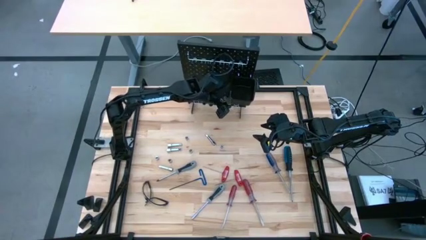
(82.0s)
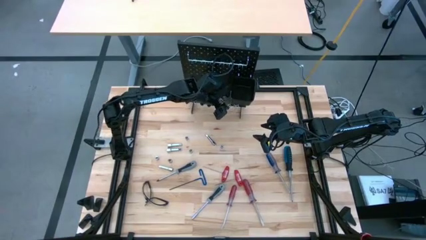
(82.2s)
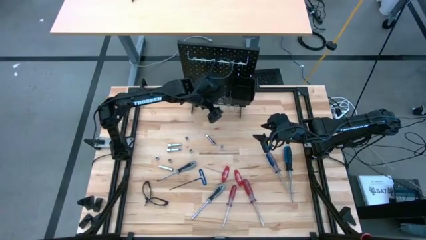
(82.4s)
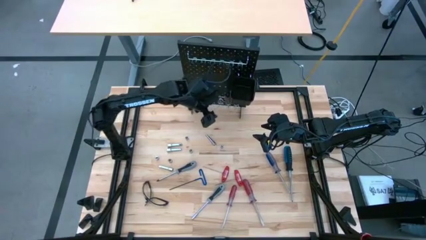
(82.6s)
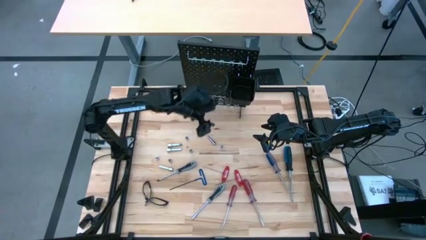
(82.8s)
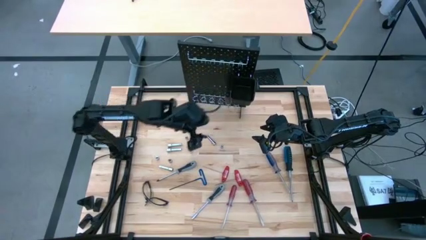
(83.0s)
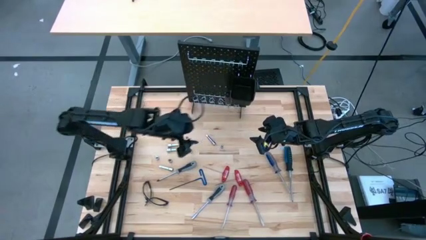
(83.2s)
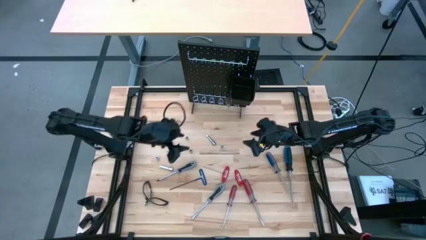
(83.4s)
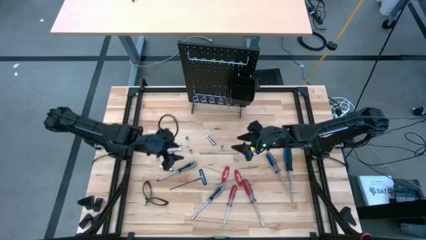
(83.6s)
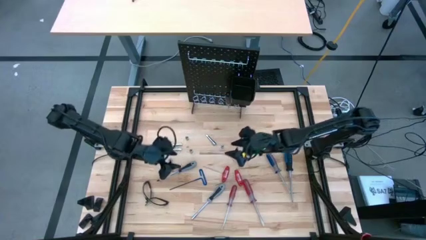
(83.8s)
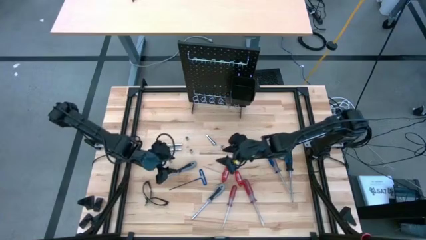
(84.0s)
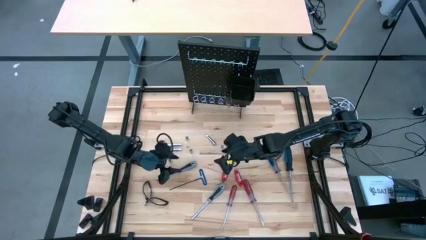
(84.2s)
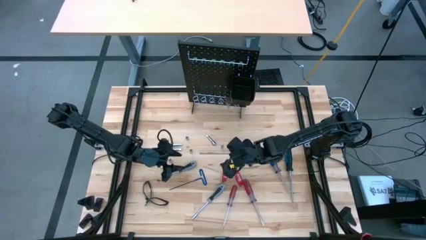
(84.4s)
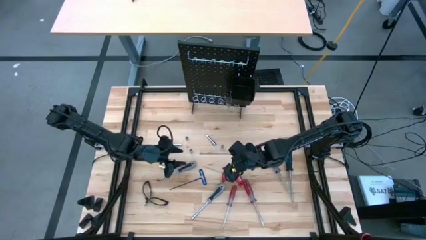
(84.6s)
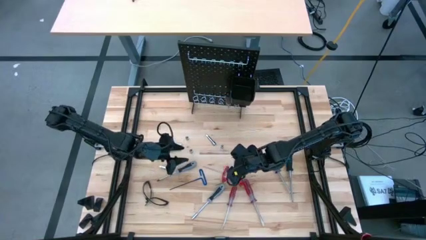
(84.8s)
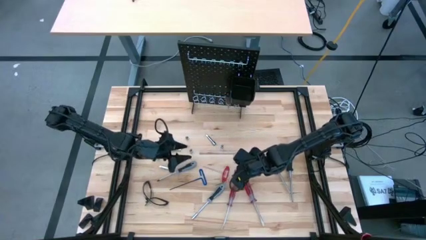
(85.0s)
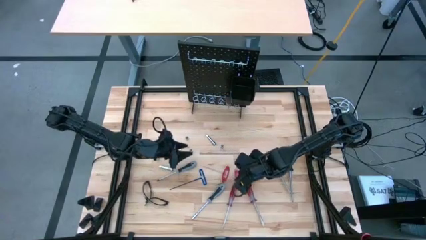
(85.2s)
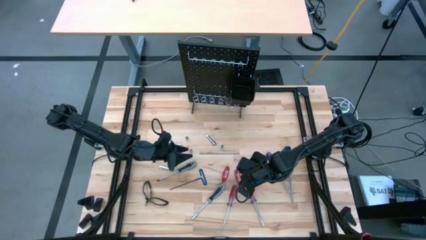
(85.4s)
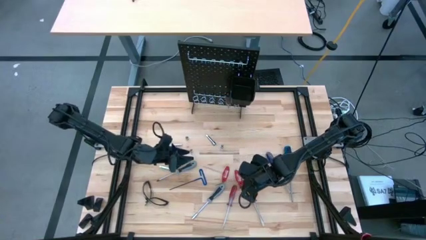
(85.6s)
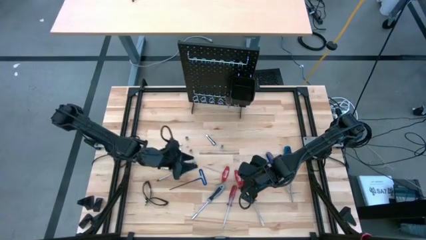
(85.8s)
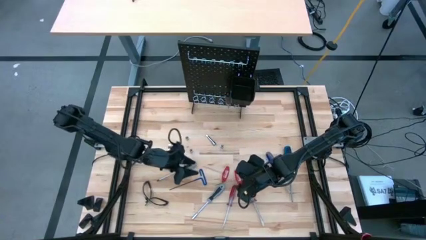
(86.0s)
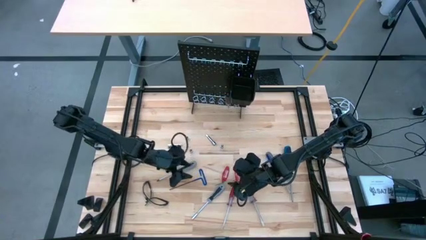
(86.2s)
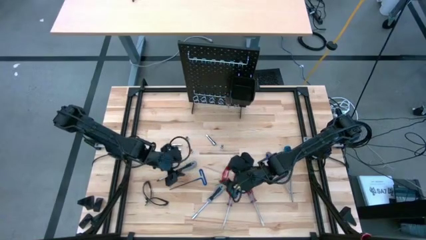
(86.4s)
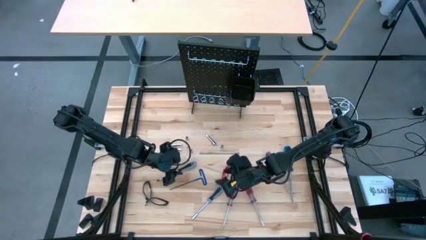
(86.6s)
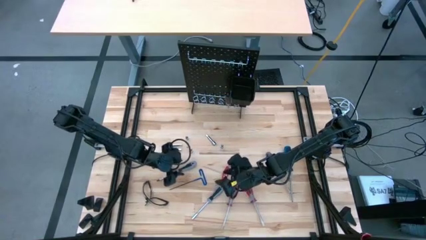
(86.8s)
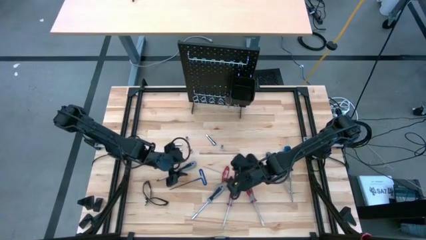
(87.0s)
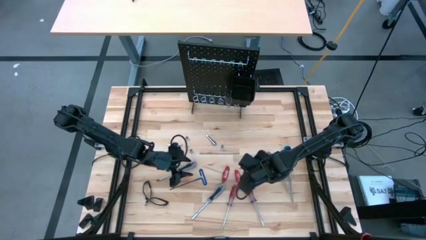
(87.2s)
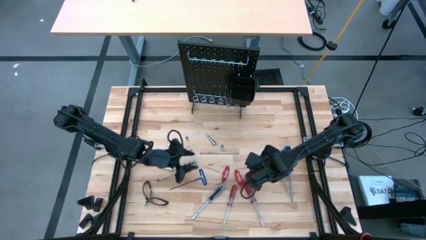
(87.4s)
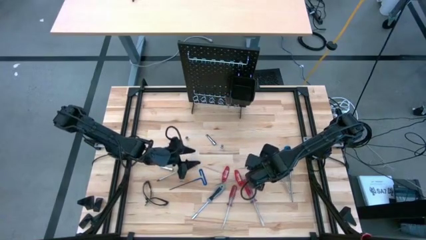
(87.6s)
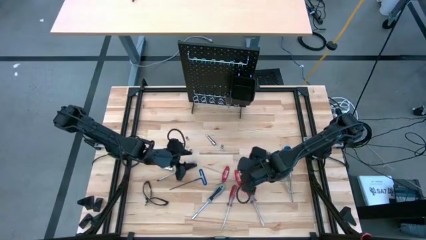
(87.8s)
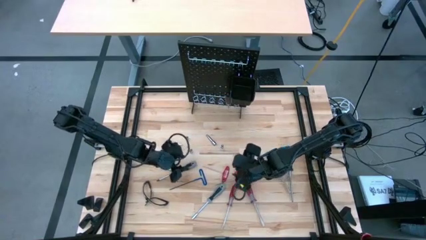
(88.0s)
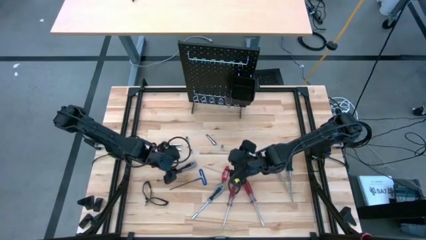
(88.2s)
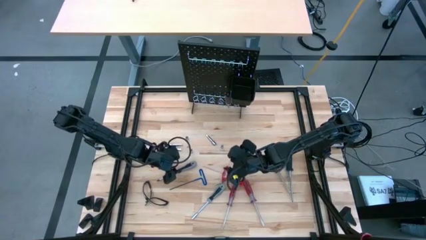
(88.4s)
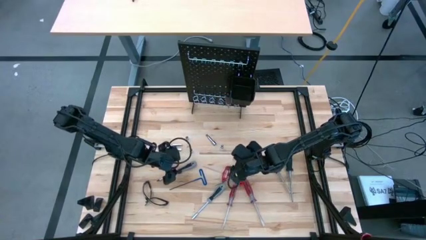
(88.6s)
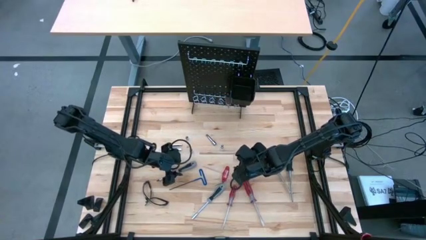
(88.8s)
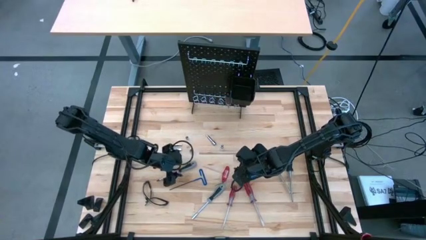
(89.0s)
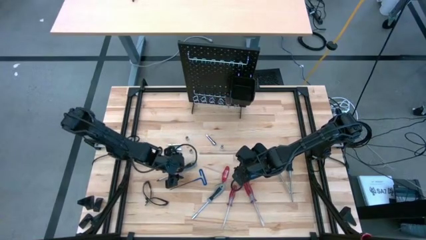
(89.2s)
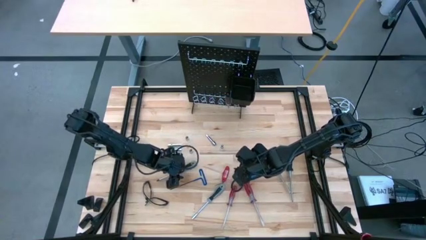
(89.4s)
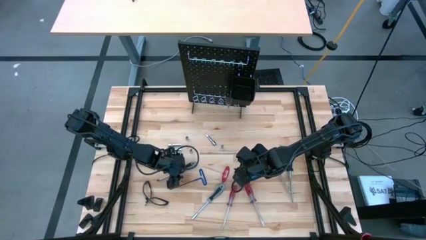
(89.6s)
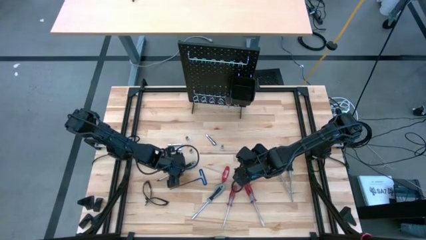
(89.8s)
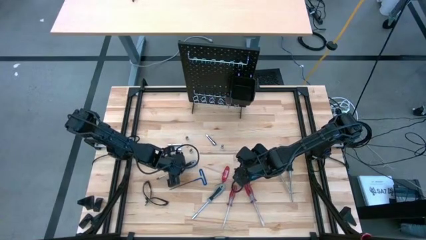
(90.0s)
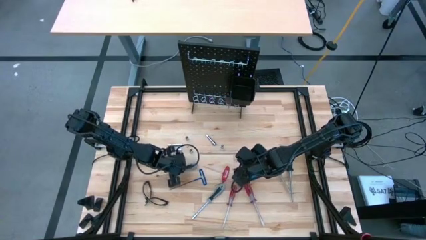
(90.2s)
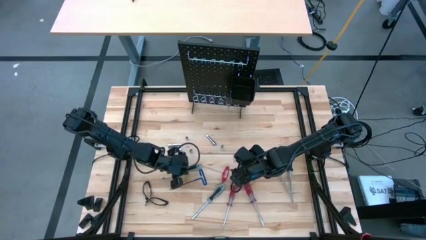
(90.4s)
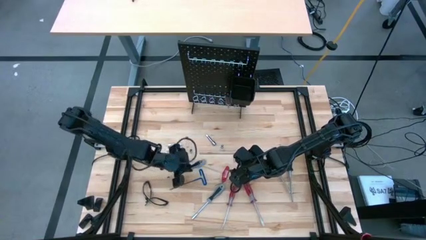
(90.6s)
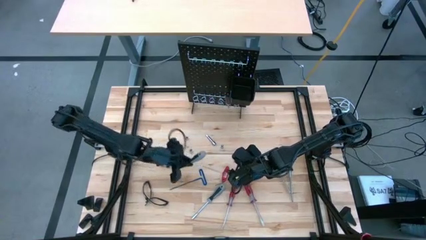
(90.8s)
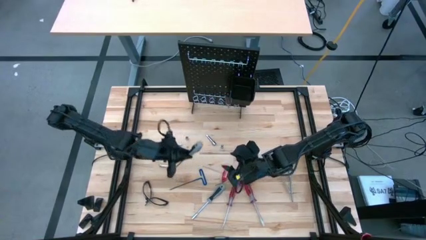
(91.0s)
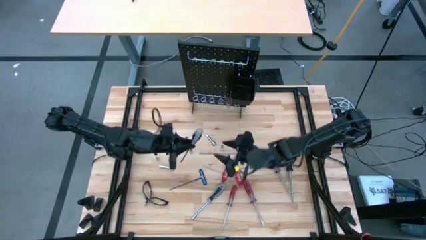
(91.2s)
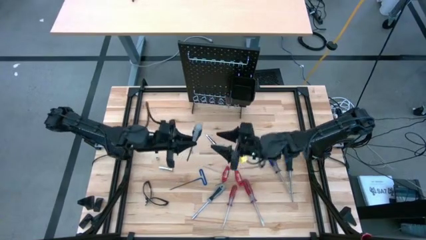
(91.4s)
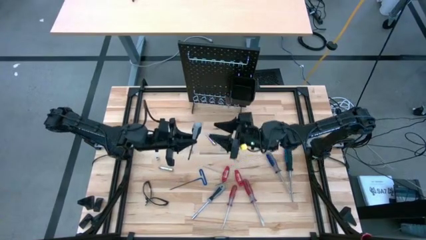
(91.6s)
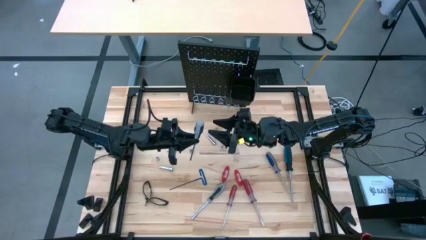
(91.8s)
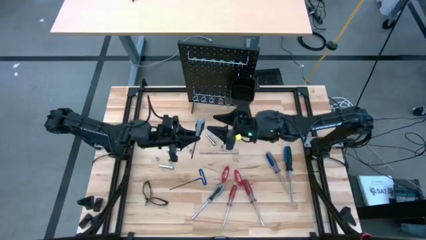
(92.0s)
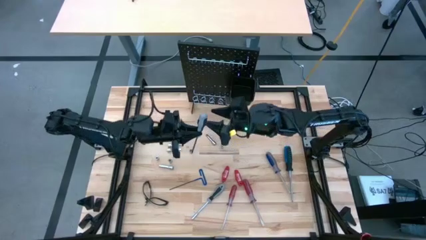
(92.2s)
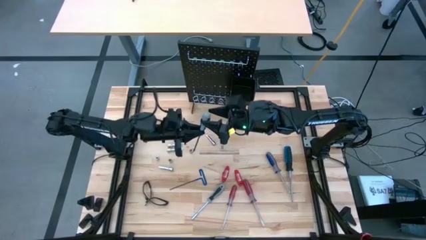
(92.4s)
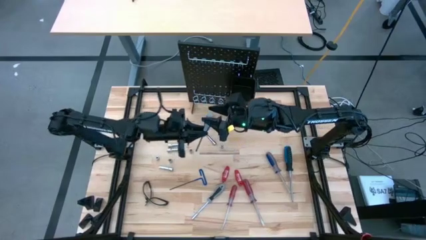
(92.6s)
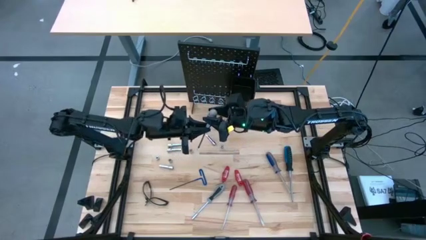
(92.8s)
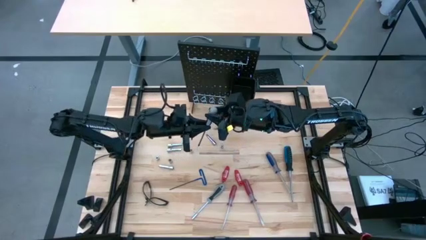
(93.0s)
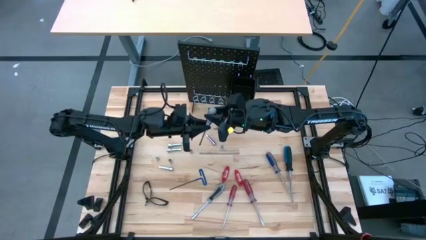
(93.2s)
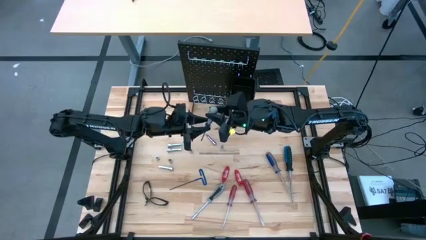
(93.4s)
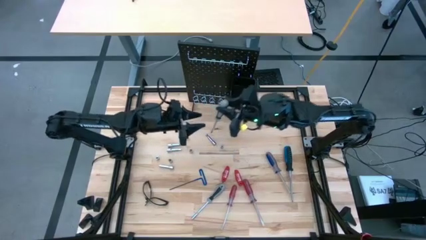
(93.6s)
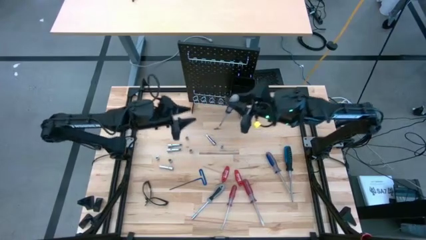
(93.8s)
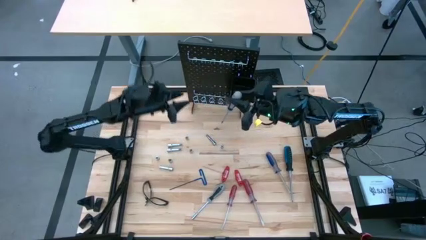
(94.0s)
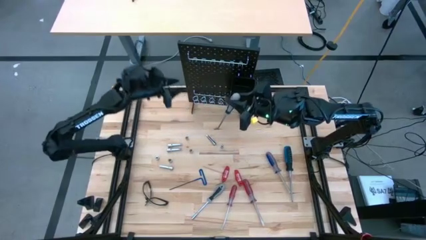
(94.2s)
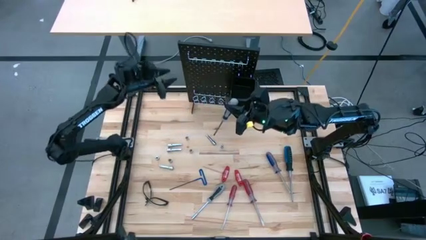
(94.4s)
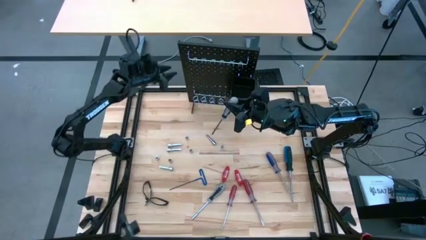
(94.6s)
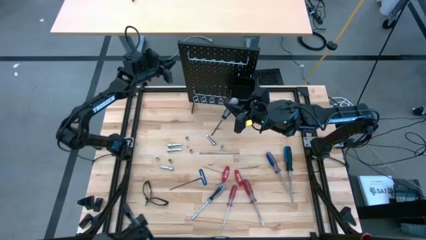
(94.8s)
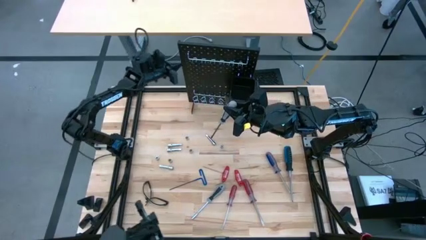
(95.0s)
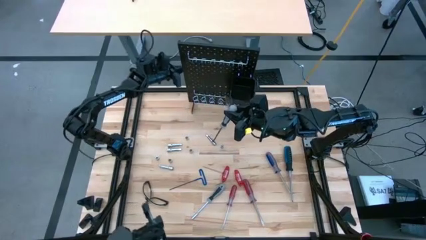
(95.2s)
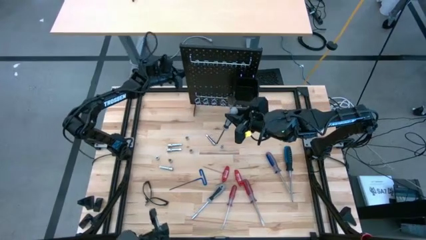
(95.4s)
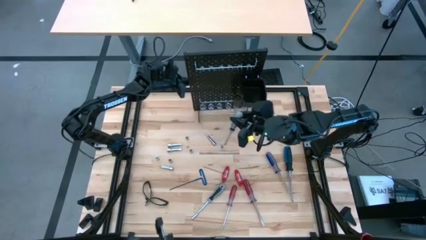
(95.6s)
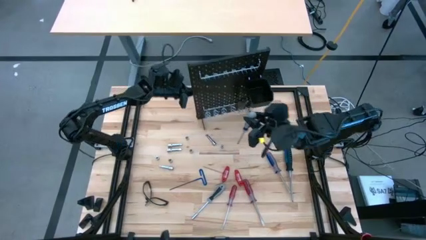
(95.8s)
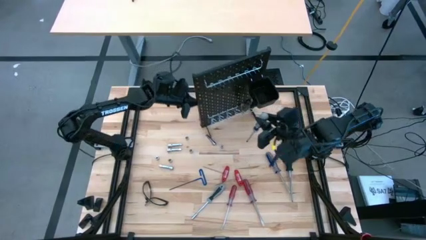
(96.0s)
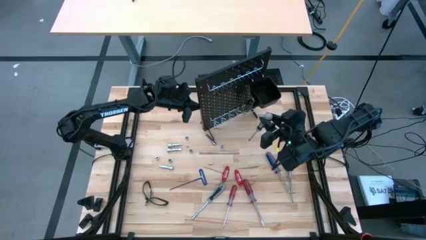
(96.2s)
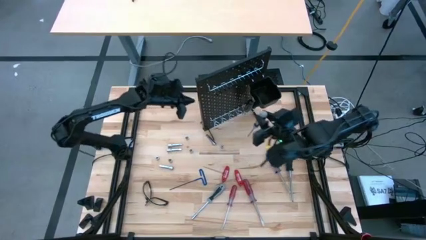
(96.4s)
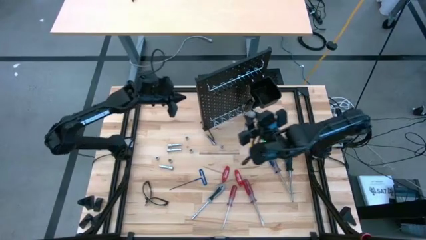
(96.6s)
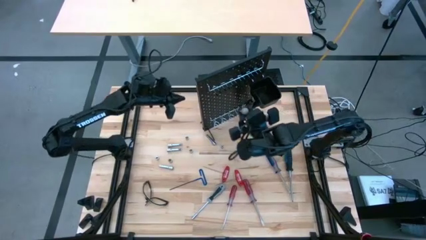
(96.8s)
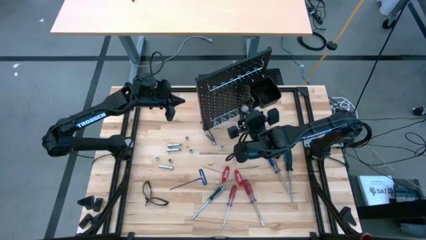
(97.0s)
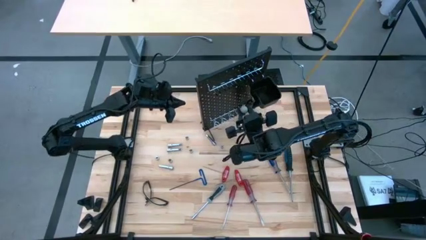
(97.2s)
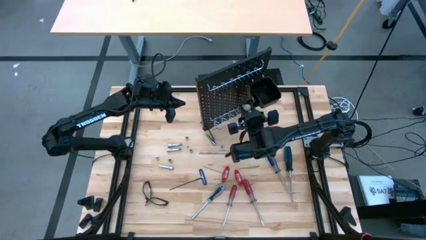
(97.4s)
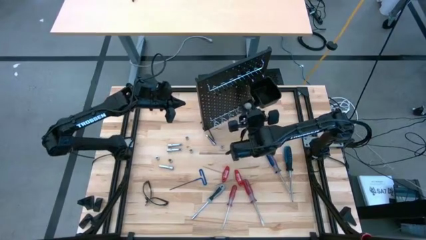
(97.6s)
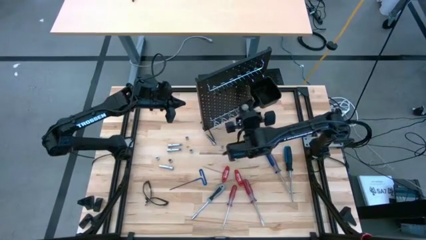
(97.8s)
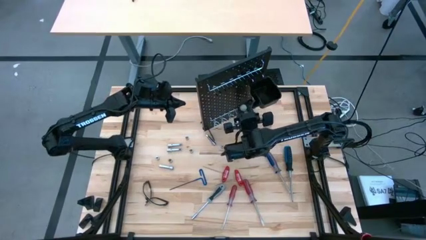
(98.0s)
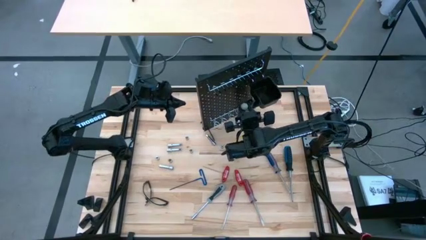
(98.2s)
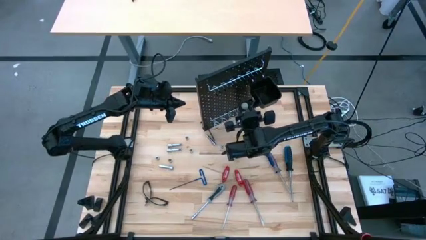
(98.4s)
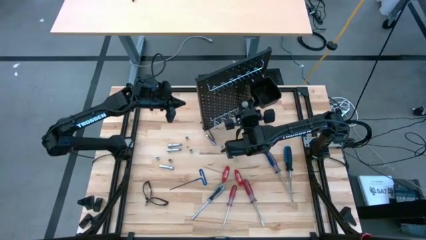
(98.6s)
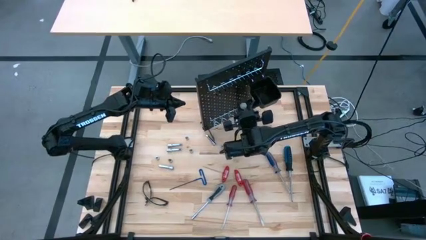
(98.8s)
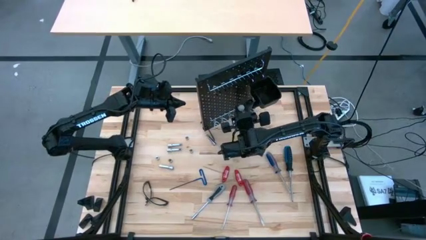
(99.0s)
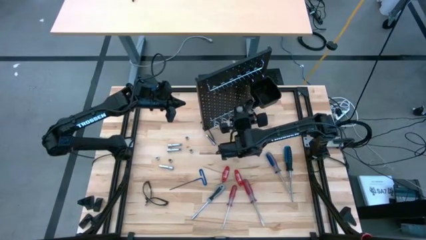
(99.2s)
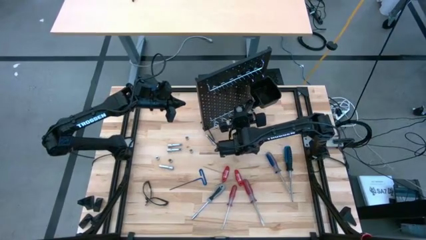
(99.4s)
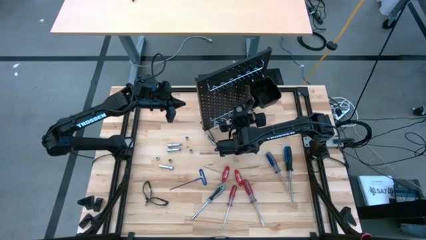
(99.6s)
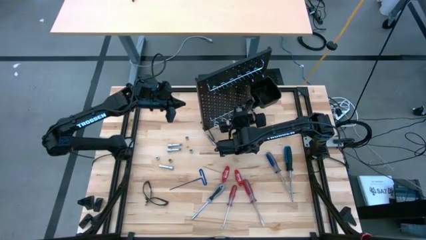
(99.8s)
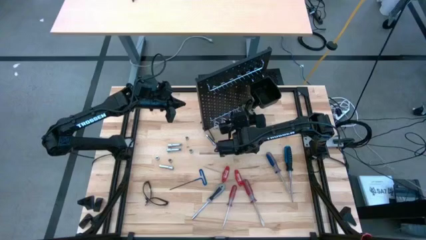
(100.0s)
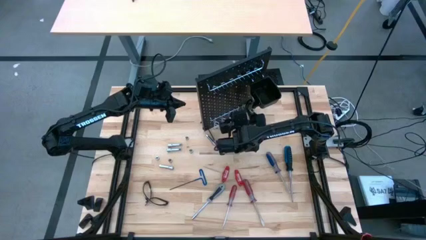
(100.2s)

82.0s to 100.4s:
Task: Hang tools onto peg board
Hang the gray-black screwdriver on the pegboard
